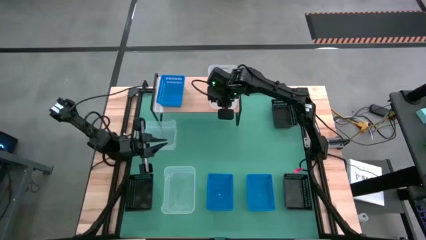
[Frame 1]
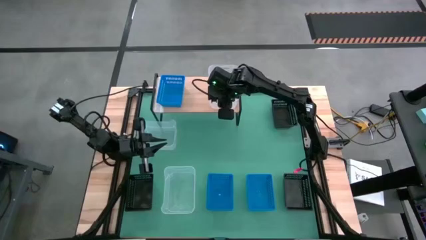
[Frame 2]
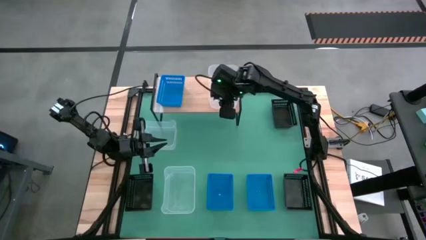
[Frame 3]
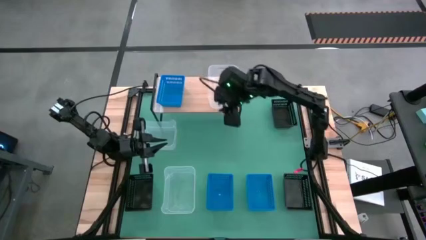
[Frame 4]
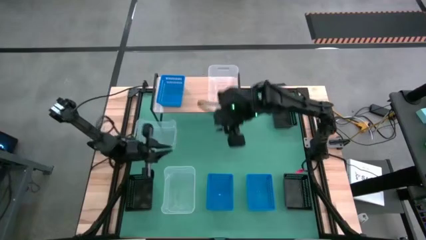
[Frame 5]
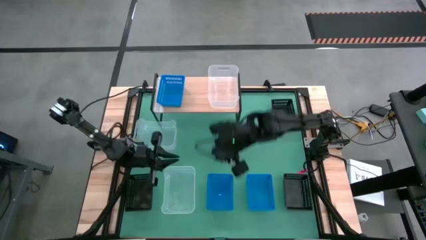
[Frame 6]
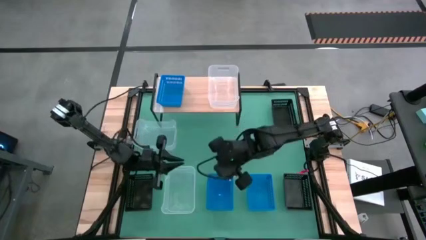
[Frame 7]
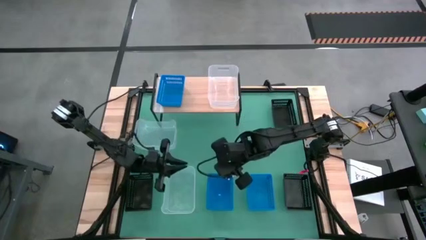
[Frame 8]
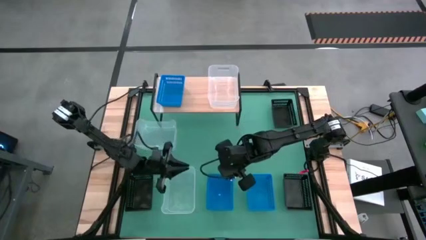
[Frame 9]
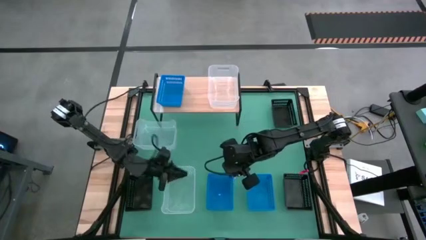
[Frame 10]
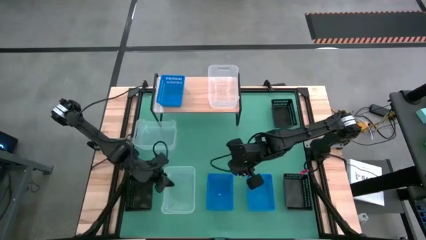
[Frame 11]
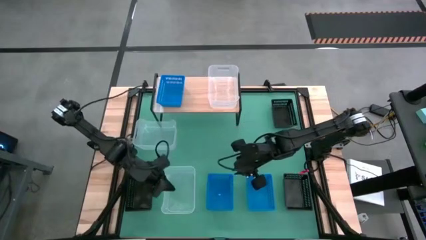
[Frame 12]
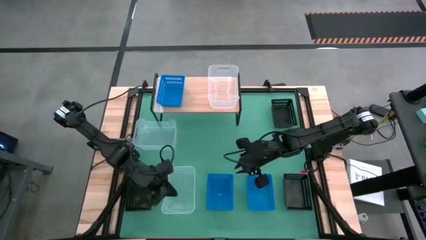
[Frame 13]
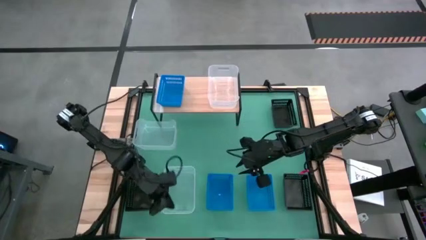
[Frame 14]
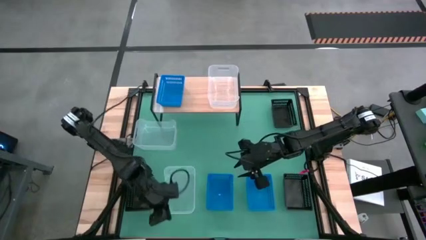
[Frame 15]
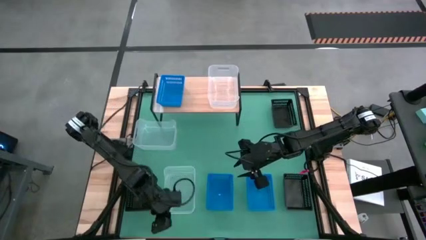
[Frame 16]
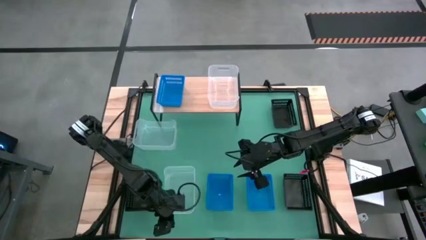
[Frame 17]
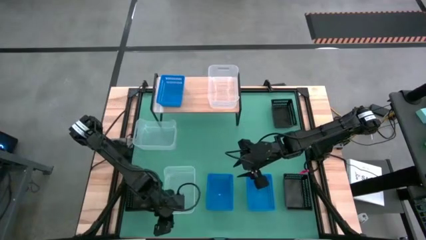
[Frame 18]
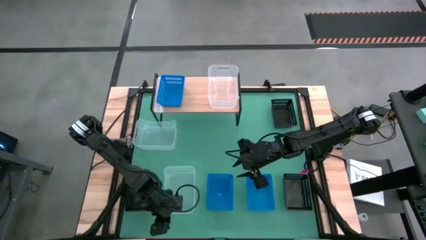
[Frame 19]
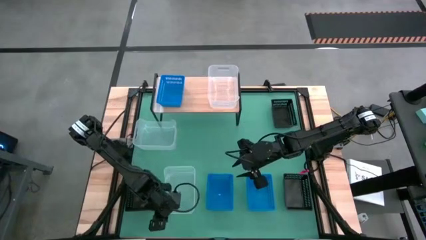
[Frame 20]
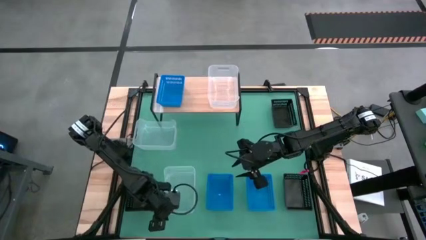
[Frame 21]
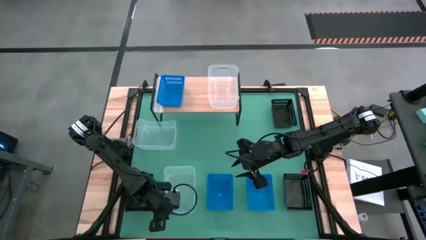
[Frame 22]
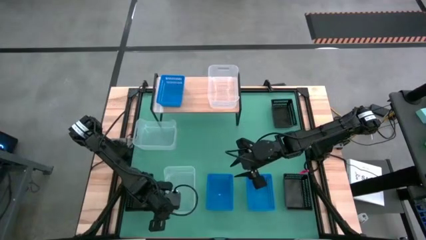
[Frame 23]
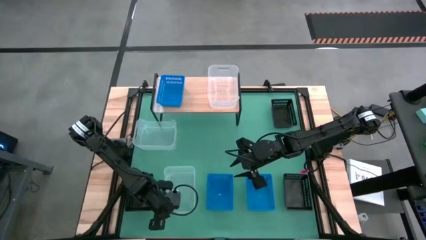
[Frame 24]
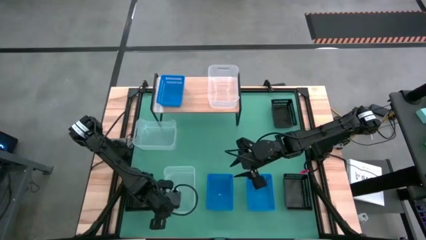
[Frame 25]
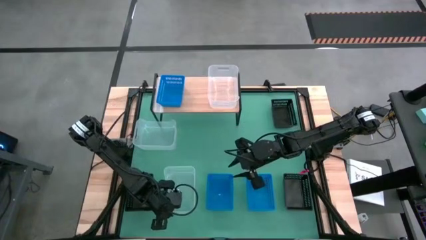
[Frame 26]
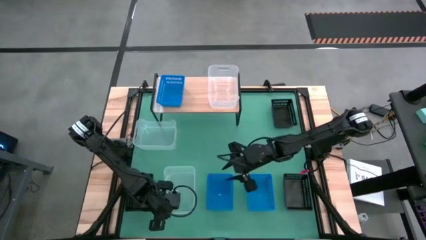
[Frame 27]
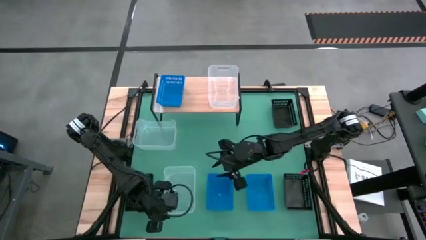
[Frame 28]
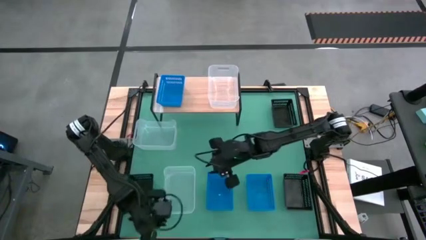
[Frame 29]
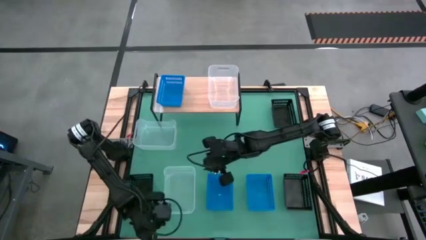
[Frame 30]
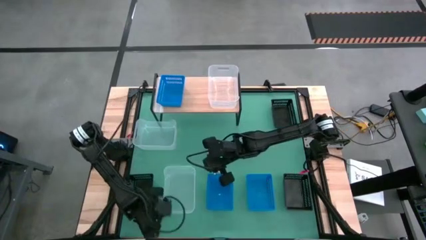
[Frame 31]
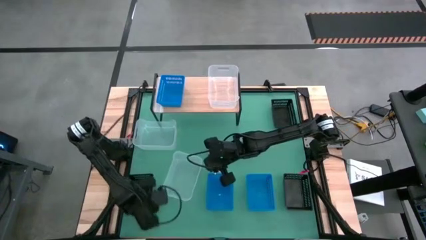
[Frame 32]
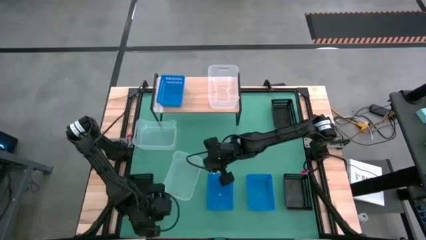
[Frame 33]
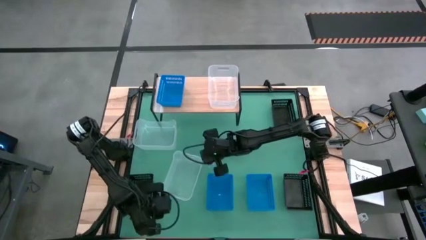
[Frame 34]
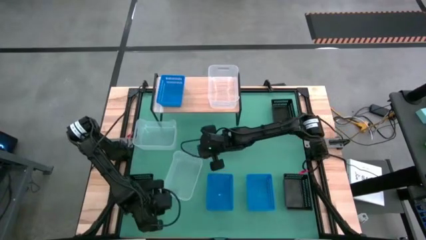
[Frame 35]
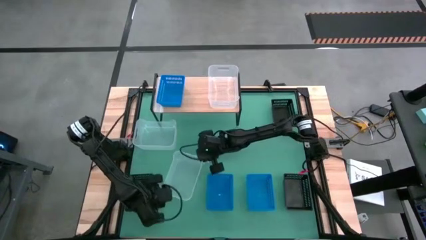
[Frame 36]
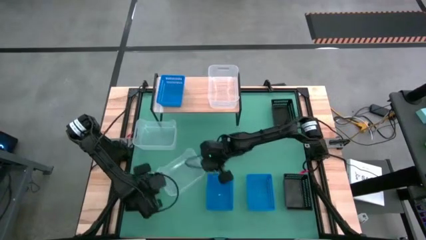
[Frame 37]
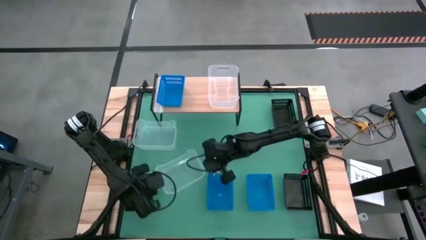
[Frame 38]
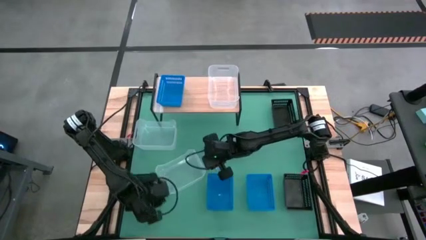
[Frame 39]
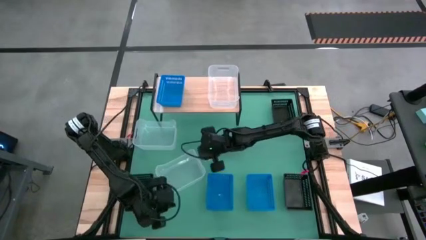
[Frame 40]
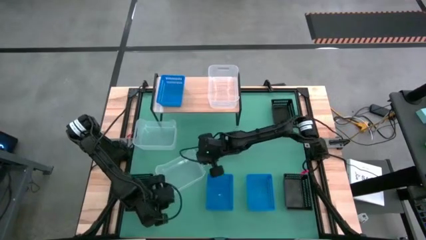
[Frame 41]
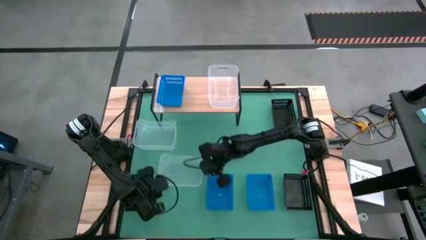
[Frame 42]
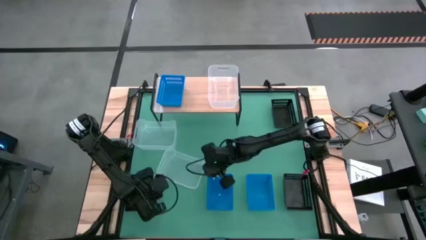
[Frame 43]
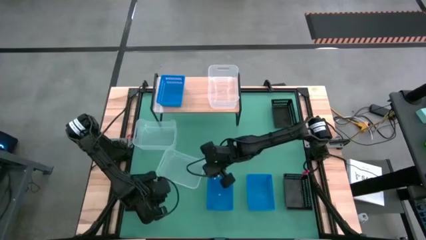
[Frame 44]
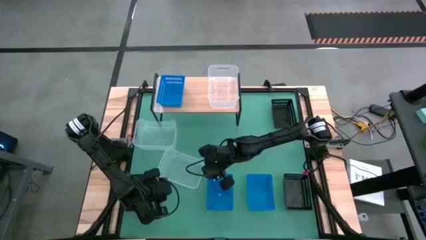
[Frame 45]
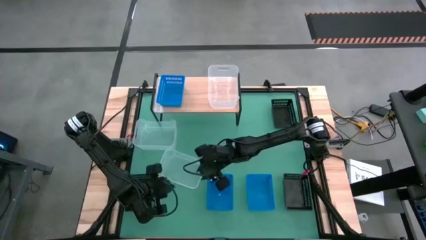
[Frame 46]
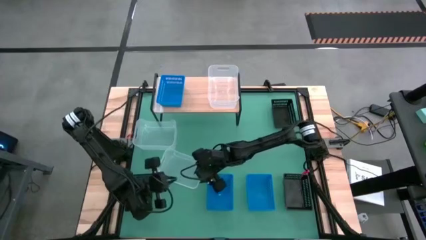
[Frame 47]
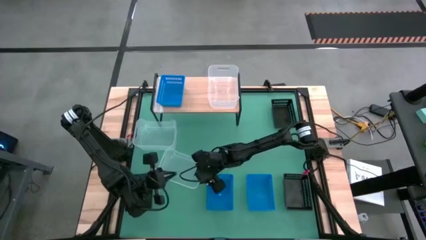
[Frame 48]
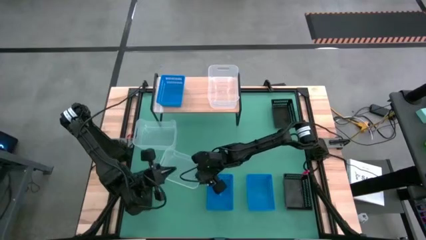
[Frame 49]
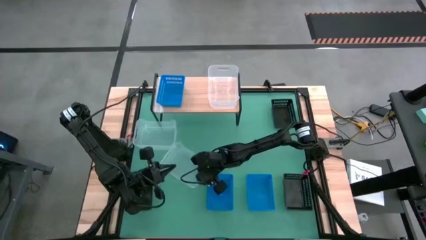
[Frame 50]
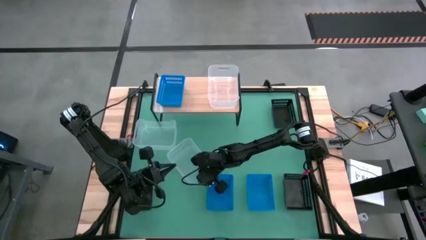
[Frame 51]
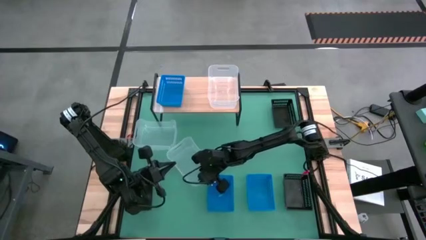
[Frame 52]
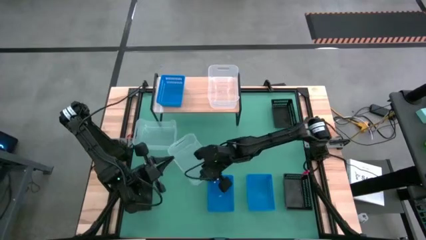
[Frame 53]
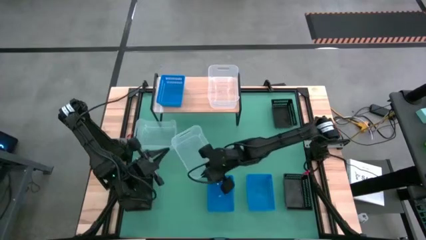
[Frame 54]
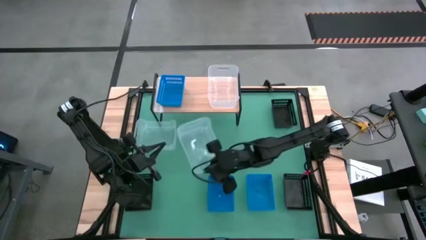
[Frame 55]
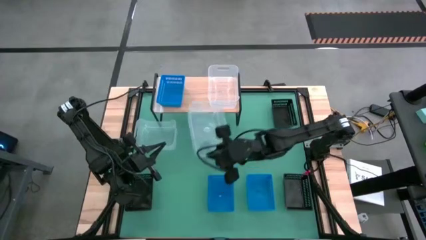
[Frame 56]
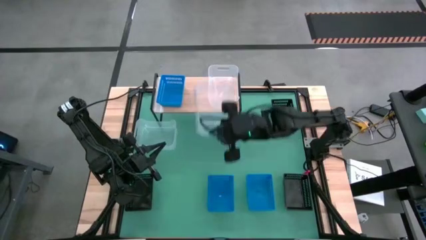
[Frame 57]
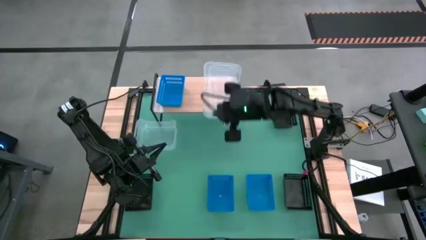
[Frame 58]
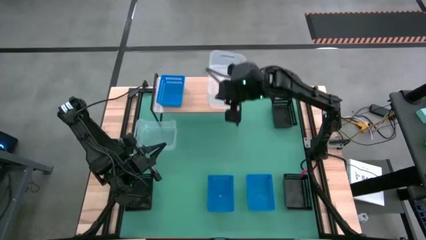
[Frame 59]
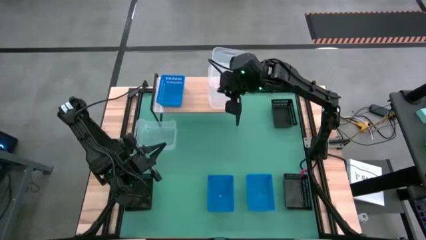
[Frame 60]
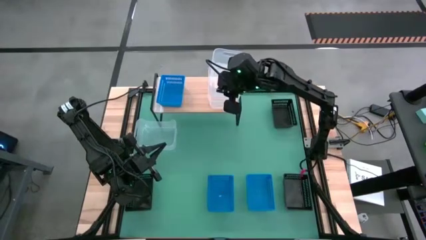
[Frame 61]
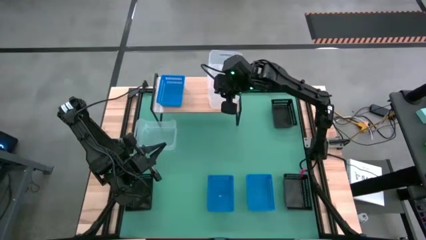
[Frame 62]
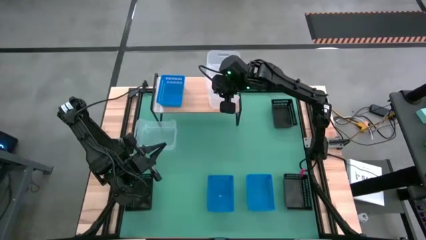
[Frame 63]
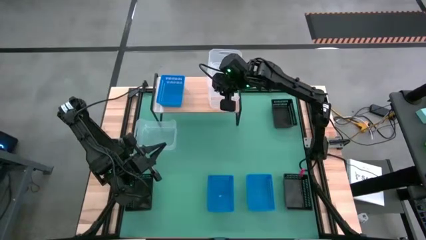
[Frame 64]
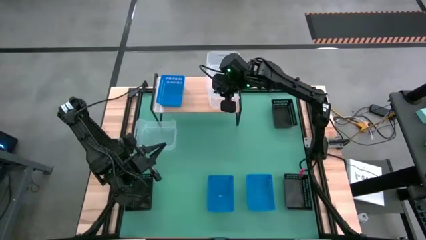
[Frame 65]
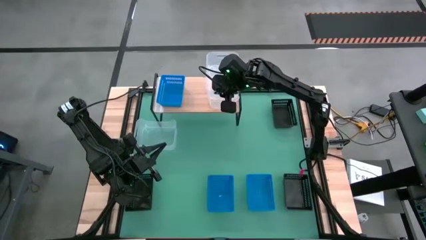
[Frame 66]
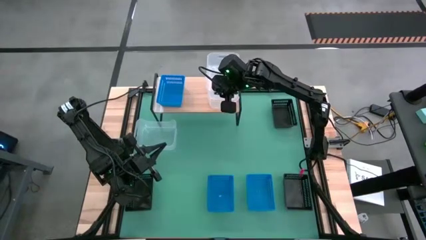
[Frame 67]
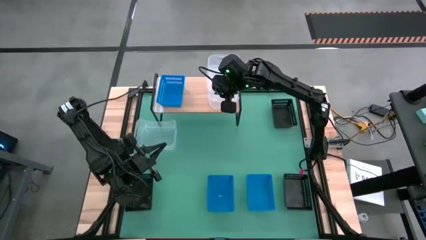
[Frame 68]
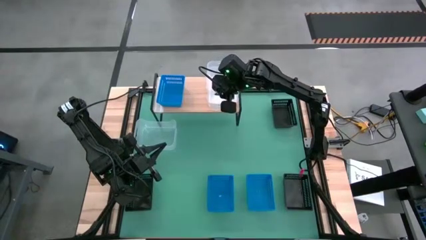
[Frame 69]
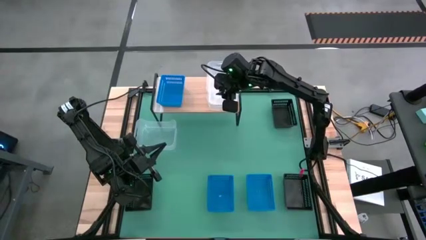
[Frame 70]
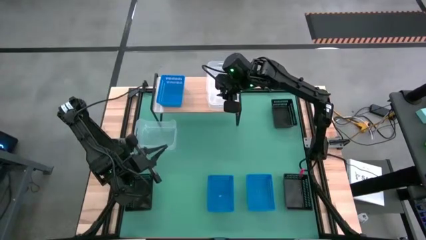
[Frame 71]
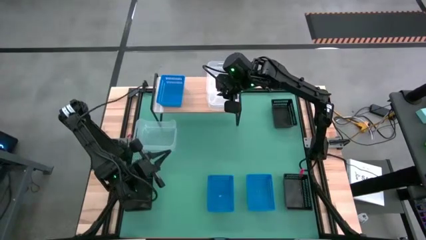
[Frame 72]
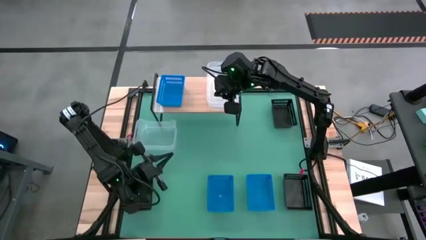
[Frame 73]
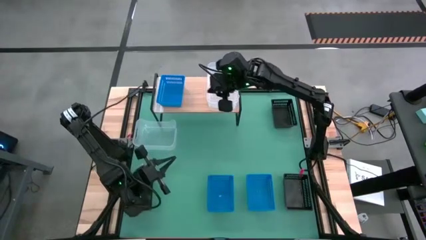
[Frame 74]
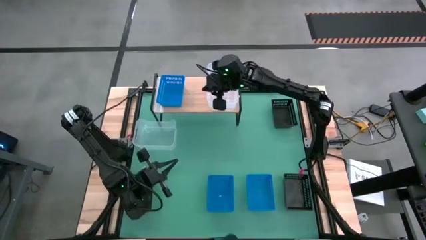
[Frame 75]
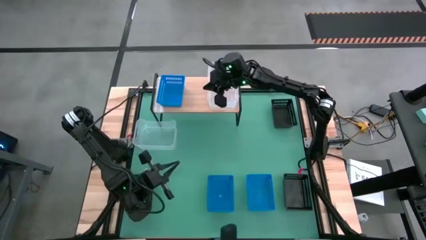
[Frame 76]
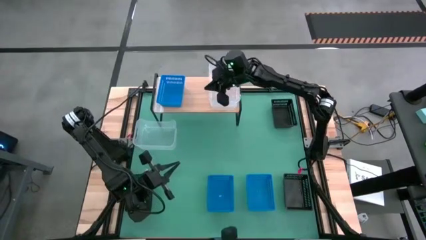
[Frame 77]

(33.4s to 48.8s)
Task: Stack baskets on shelf by color
Stack the bottom transparent bin on the other transparent bin on the shelf

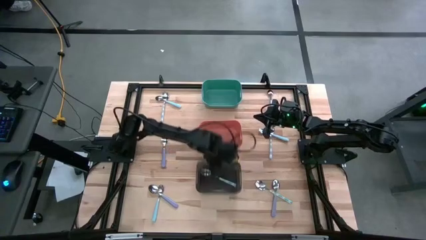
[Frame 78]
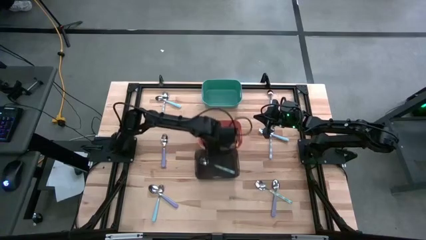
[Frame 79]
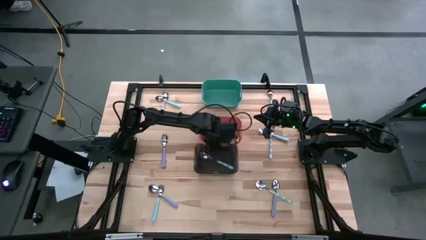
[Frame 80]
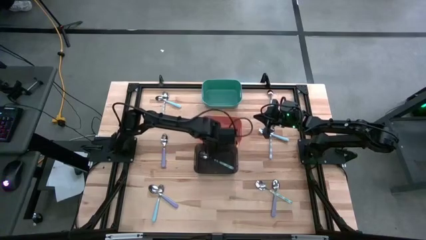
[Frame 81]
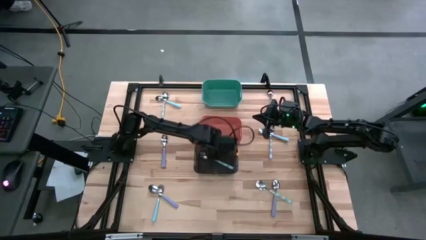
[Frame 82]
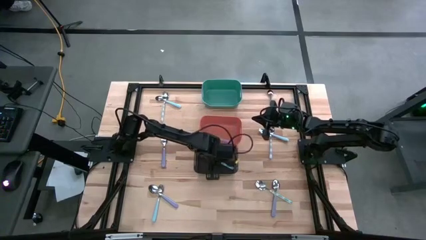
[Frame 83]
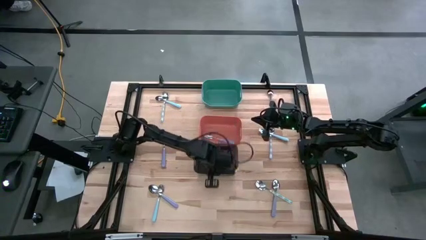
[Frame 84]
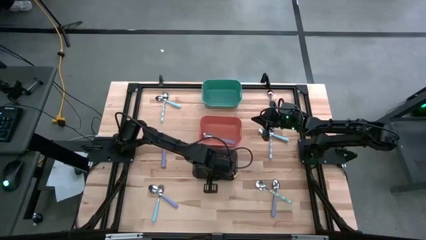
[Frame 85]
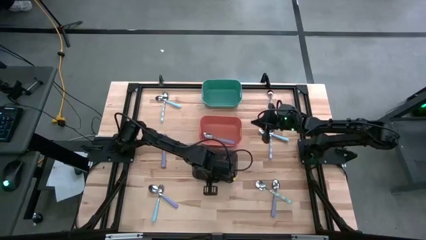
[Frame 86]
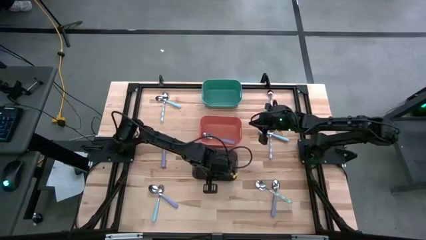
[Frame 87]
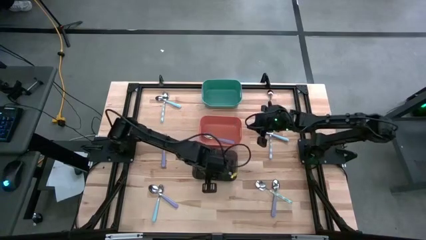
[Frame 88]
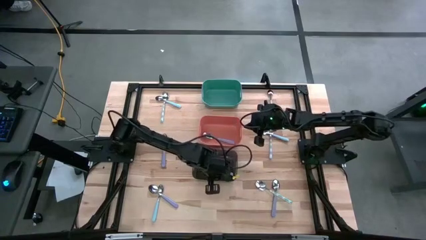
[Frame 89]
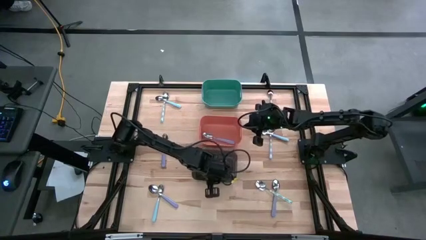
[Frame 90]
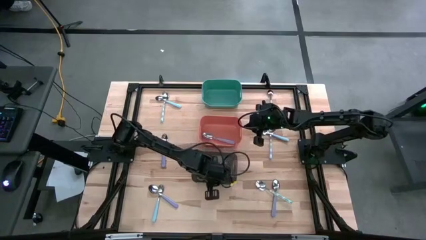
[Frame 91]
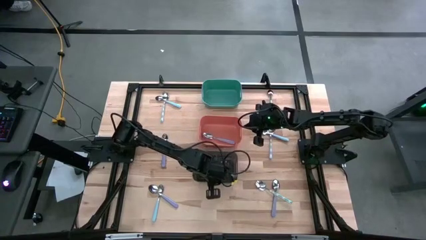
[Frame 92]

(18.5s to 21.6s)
Task: Sort silverware by color (type)
Adjust the black bin
